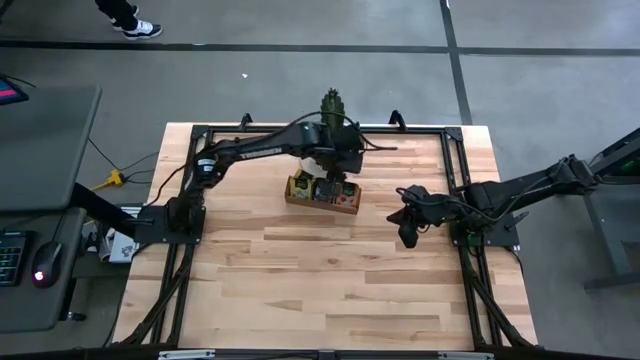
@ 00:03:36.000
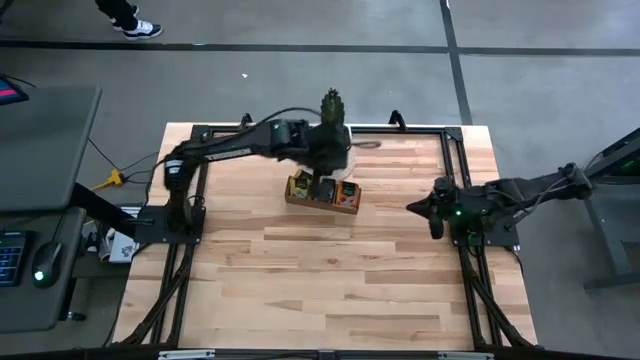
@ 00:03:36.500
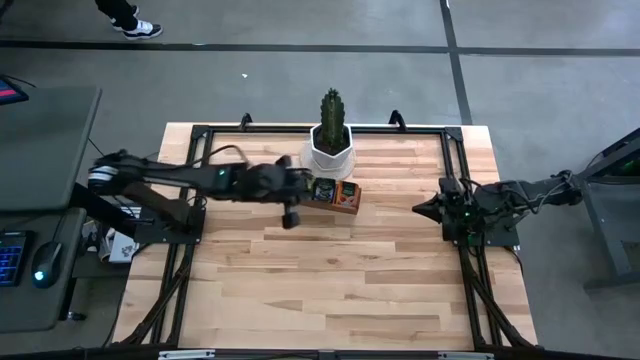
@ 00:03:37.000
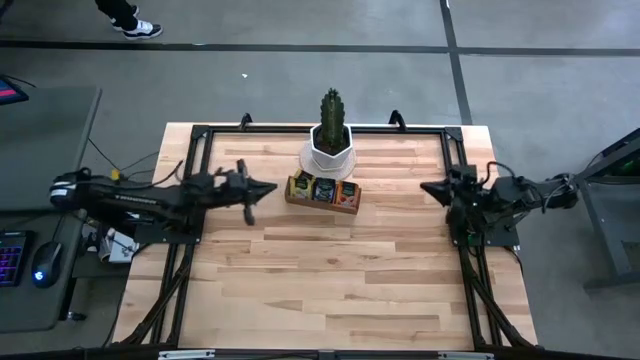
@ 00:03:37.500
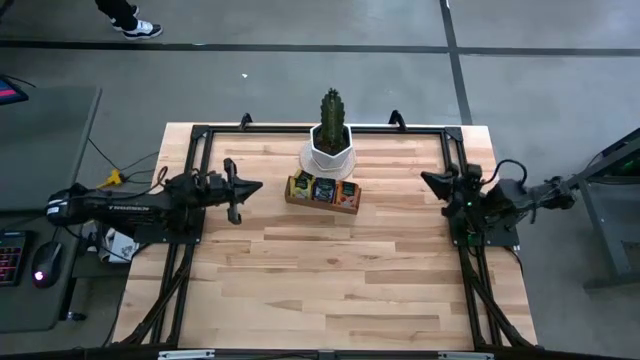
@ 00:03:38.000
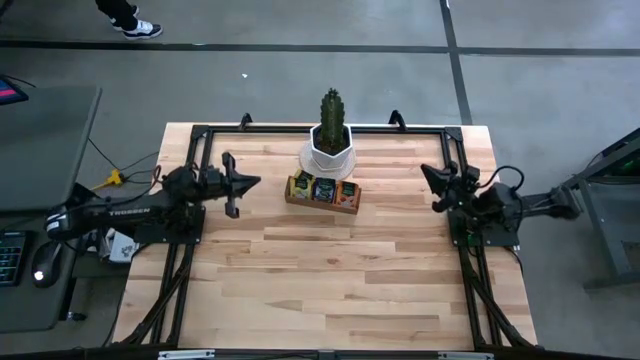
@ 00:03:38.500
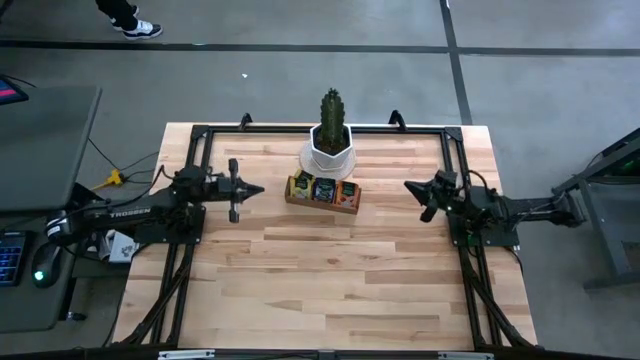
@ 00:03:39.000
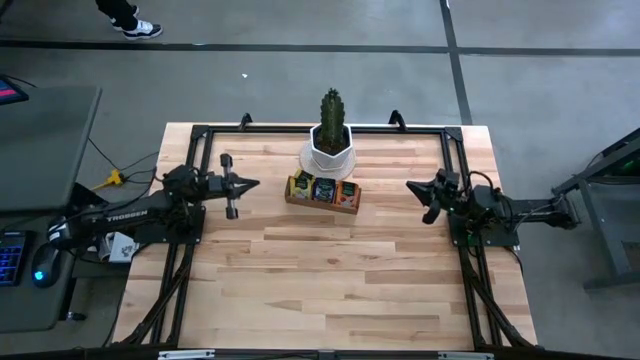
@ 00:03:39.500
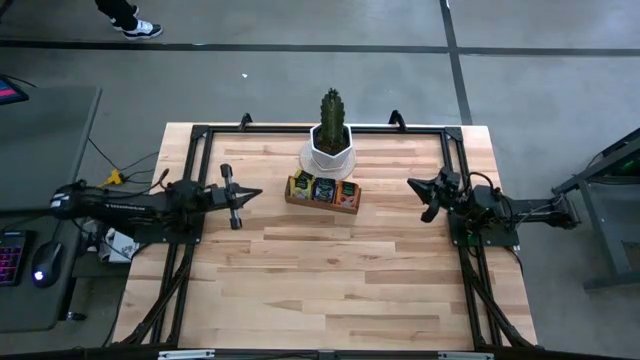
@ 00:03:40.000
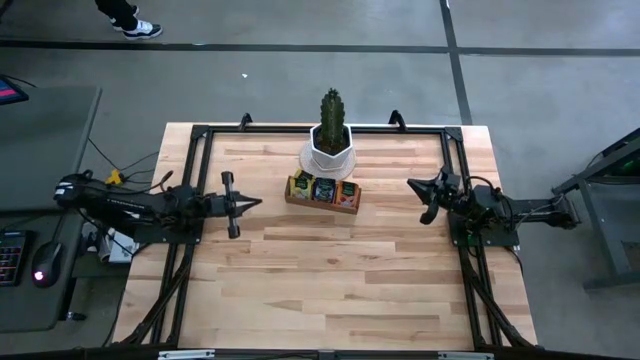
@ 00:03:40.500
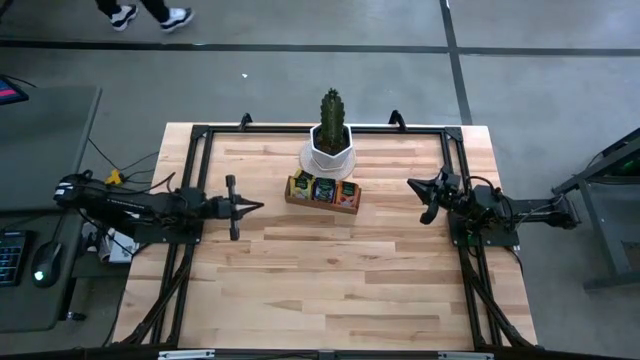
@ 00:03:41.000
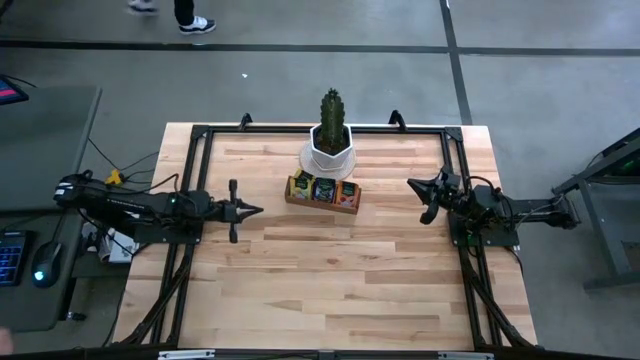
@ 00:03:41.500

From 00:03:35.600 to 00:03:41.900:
Task: Pick & Place Tea
Return to Home Position

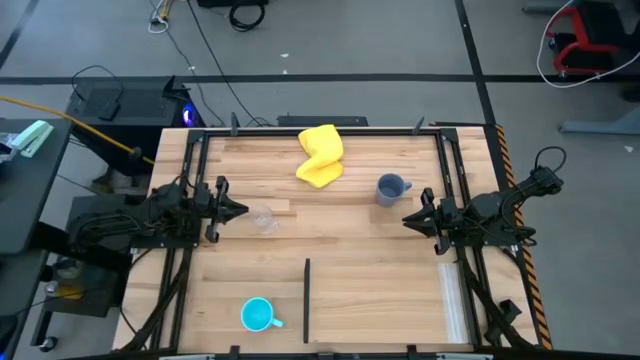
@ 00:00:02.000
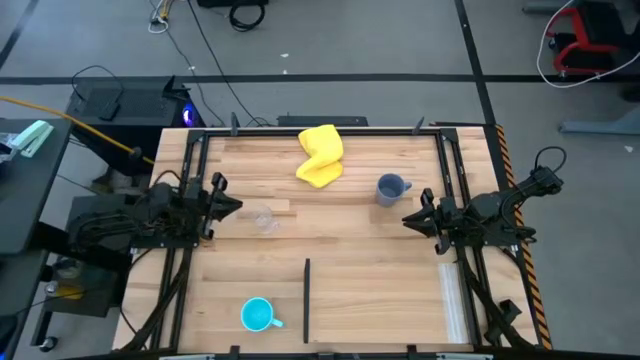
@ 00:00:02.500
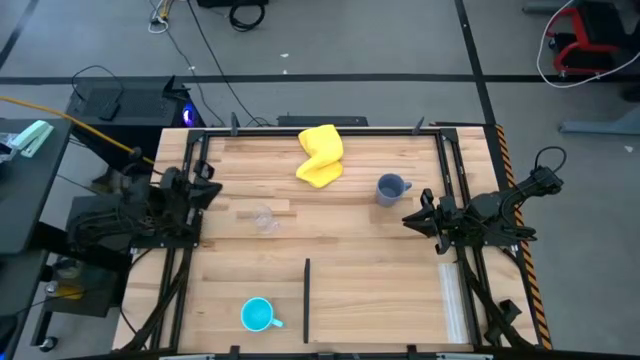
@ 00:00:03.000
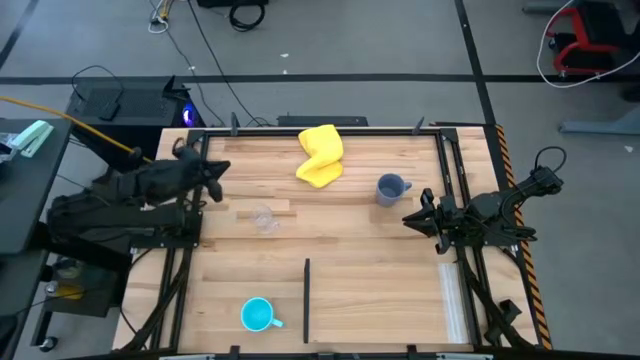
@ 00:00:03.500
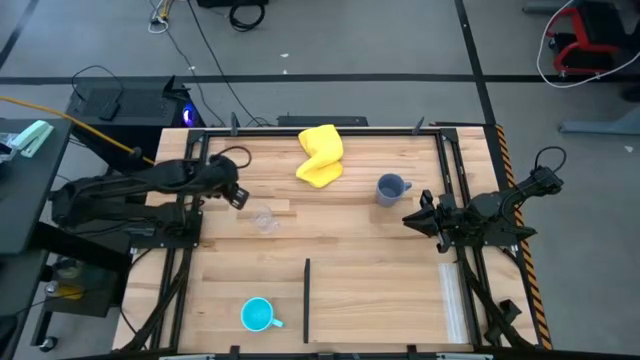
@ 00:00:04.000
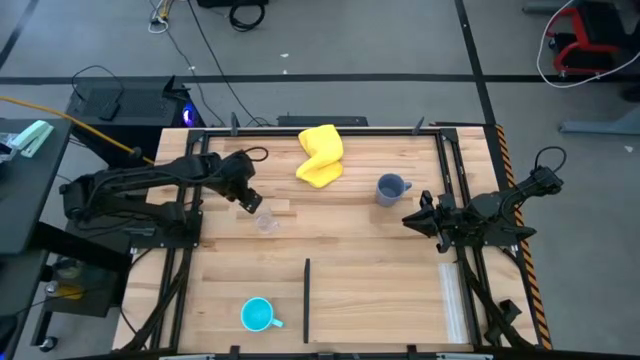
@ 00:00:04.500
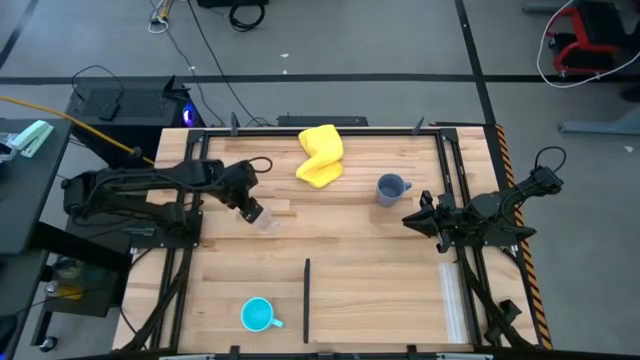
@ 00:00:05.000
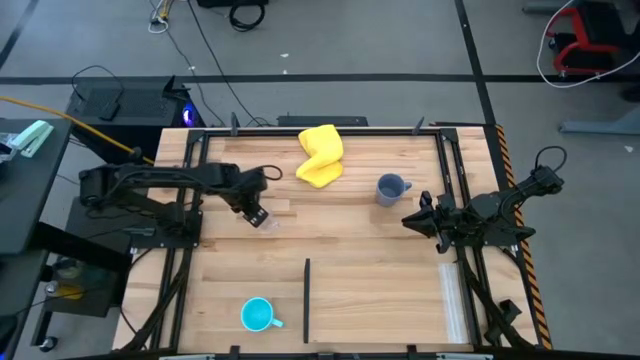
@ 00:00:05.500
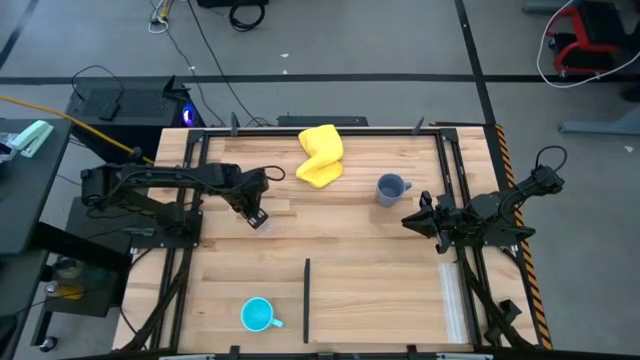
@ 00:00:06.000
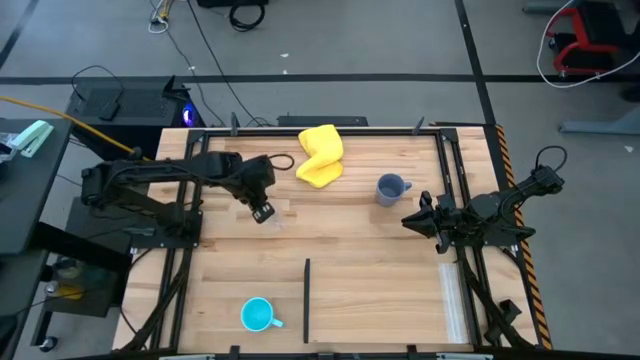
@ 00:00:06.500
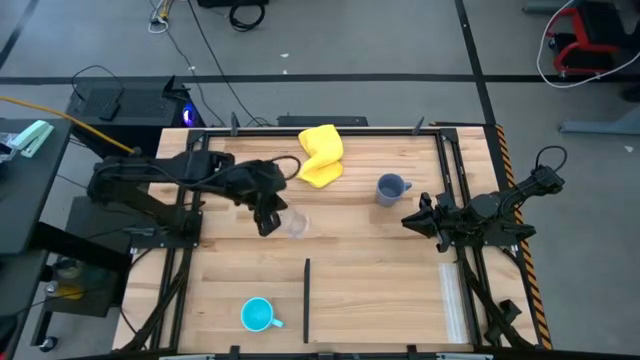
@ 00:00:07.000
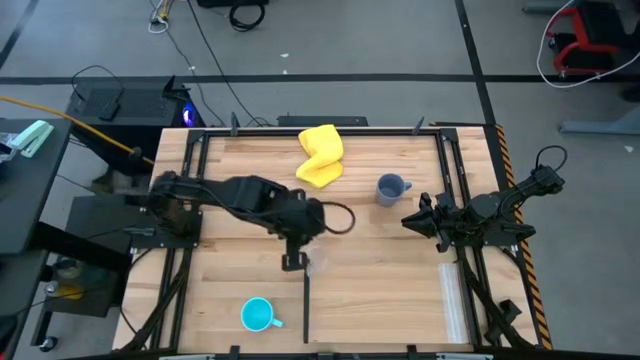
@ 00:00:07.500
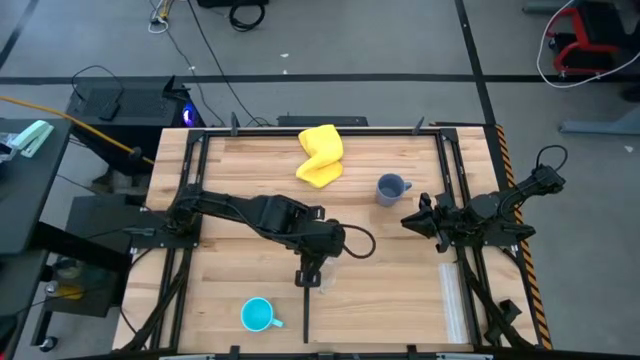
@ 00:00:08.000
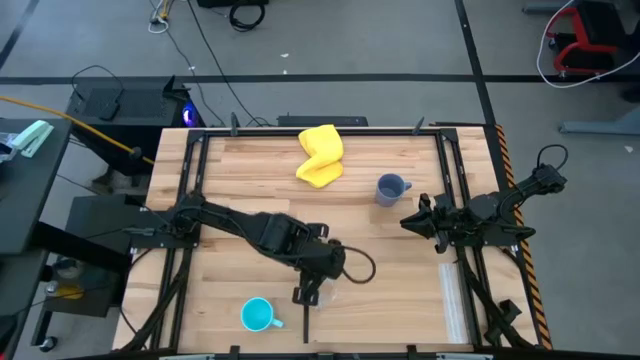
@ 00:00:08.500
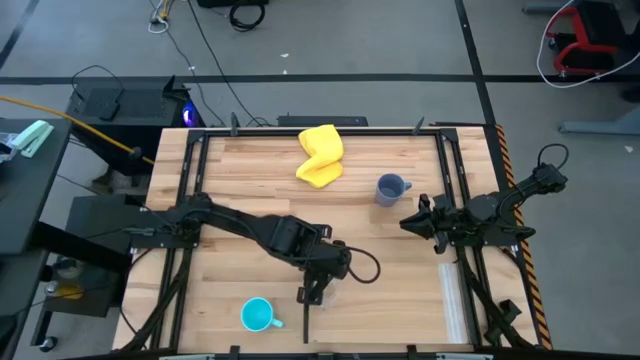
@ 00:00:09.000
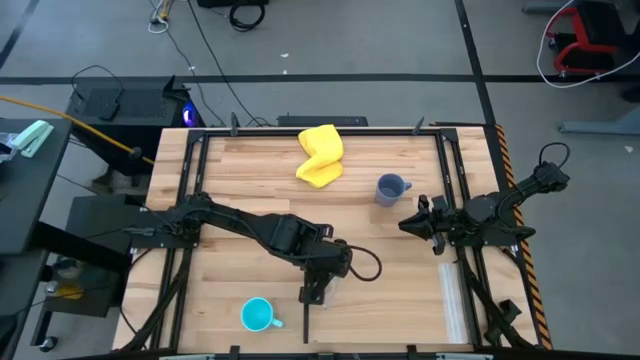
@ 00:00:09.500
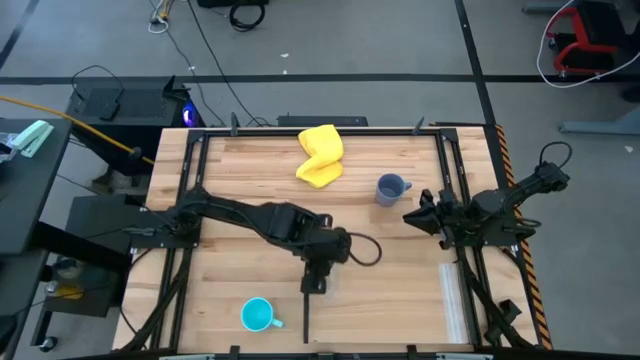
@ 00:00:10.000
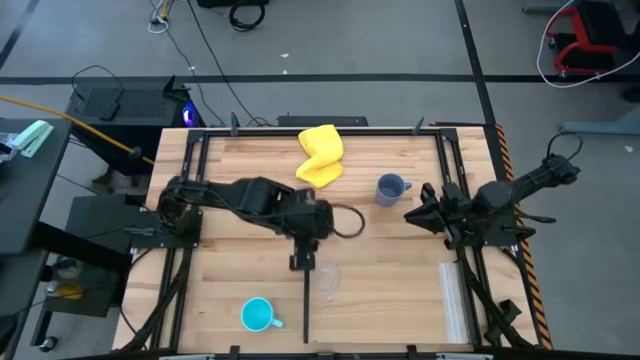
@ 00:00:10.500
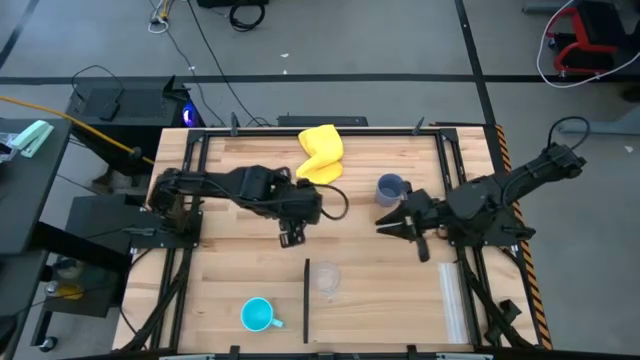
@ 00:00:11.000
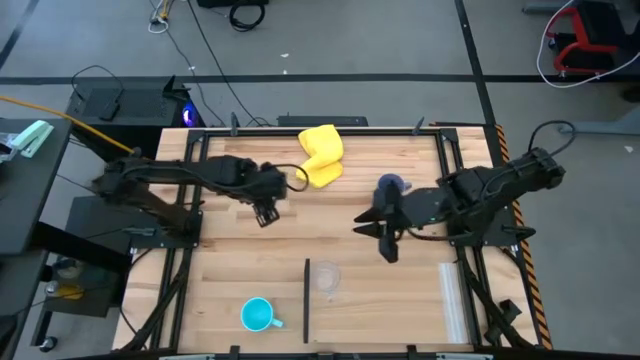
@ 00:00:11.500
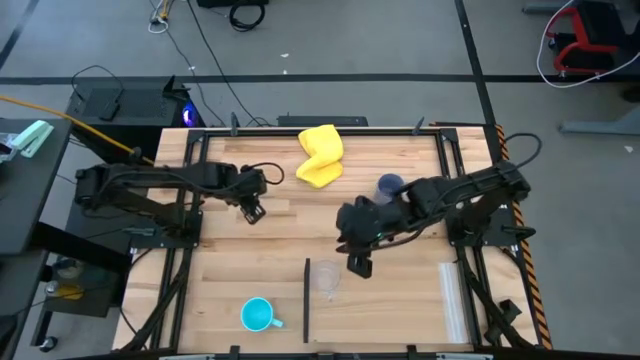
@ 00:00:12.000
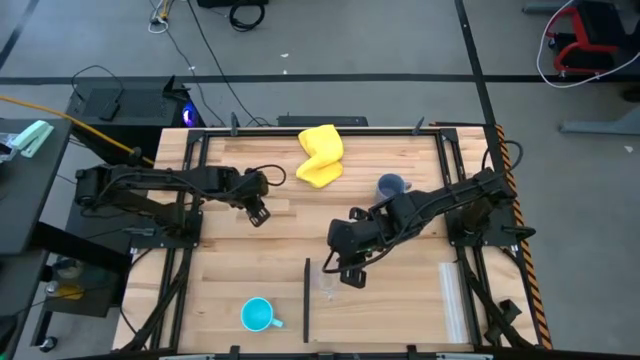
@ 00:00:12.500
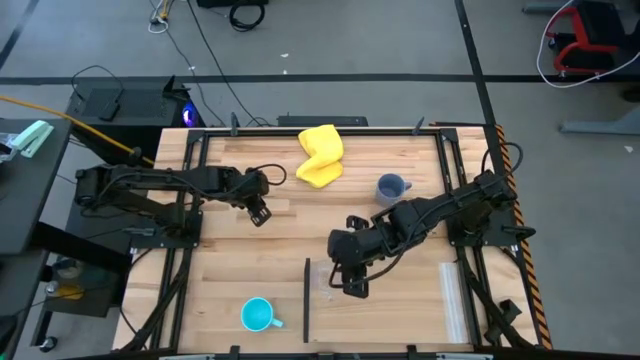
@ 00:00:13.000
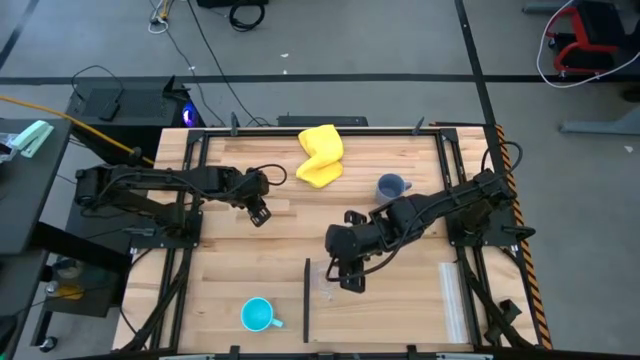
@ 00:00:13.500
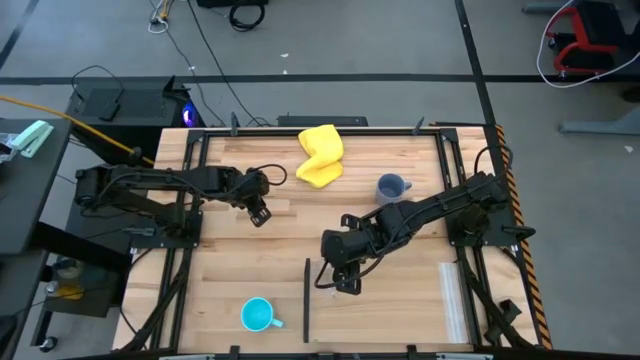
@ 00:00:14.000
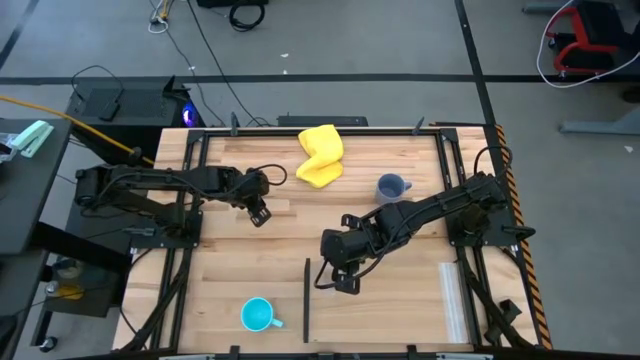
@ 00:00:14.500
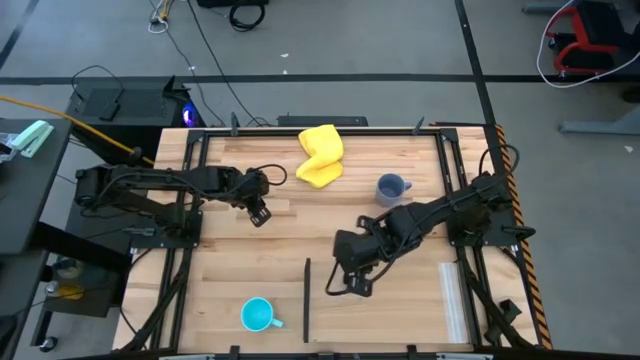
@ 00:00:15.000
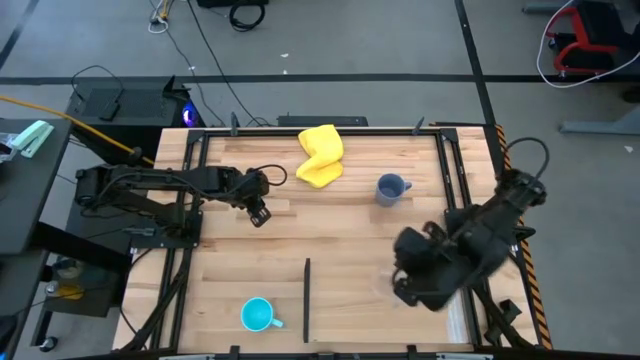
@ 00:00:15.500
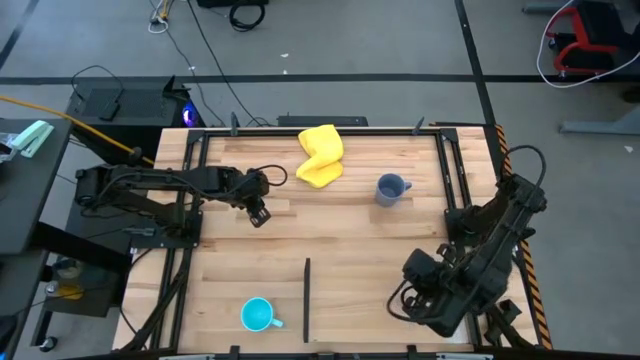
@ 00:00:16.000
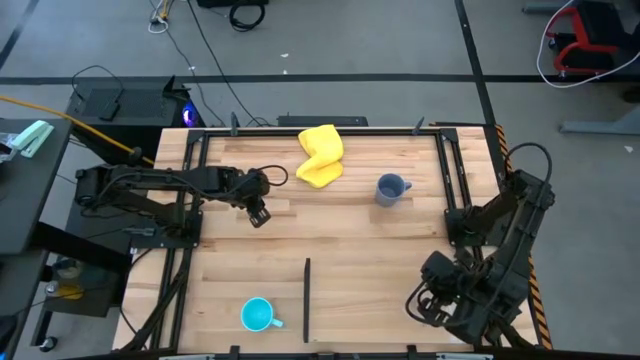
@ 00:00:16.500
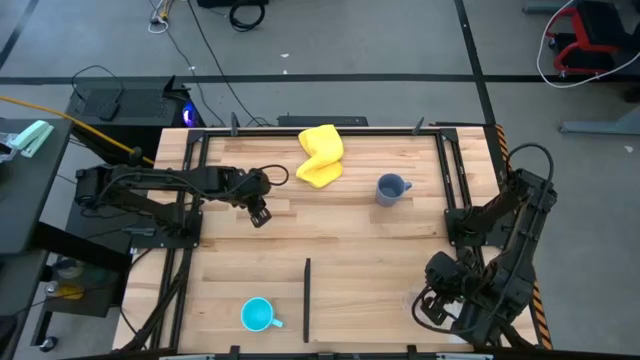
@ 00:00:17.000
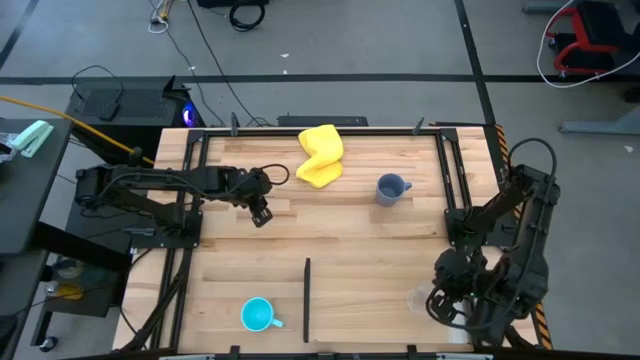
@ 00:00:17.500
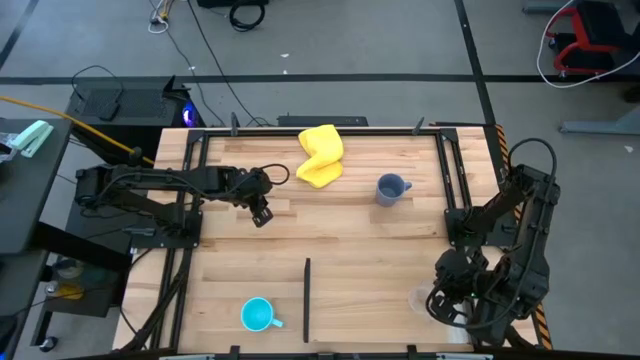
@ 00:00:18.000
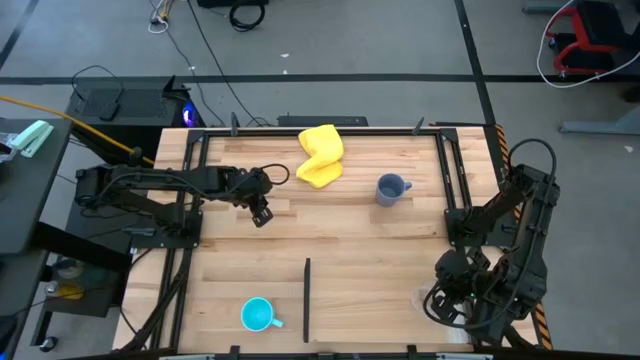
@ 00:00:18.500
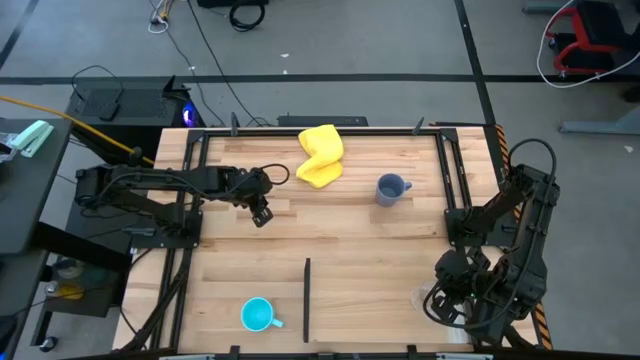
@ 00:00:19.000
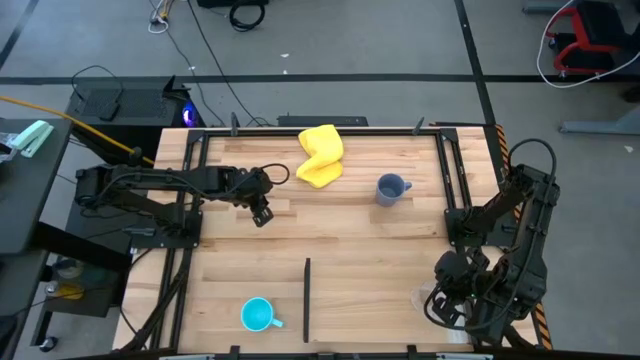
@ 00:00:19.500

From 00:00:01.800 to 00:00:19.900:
Task: Stack small to large cups/mugs on shelf
Put the transparent mug on the shelf
